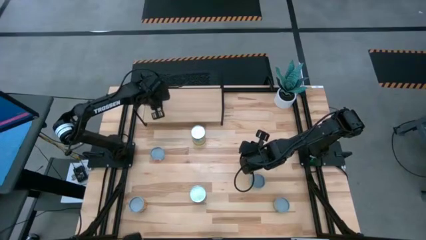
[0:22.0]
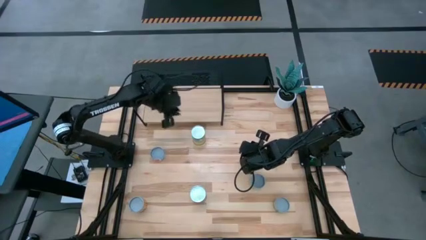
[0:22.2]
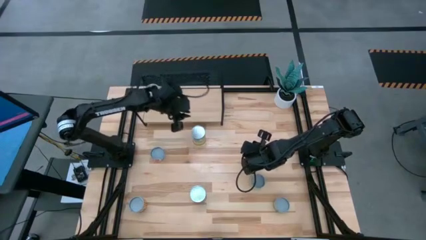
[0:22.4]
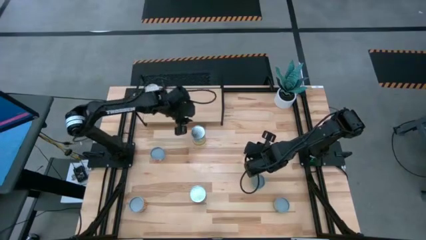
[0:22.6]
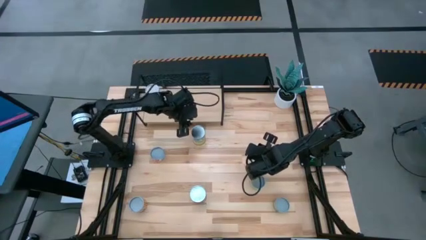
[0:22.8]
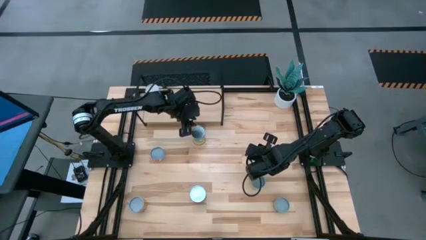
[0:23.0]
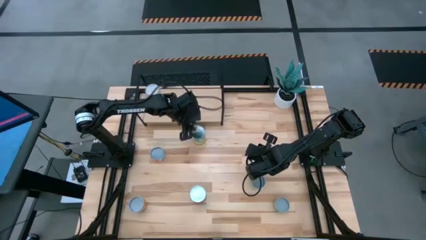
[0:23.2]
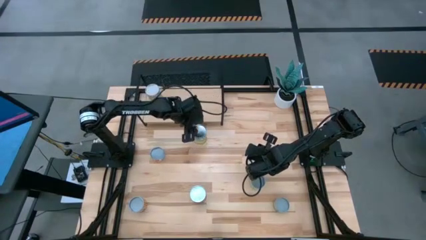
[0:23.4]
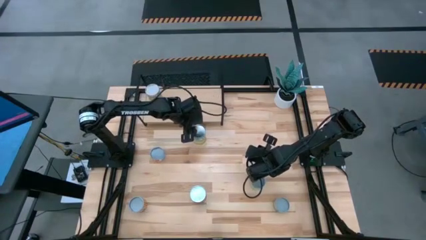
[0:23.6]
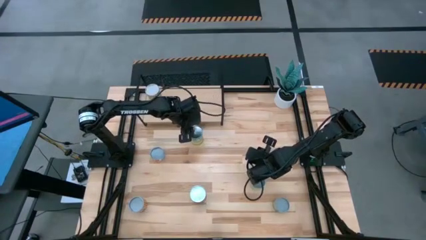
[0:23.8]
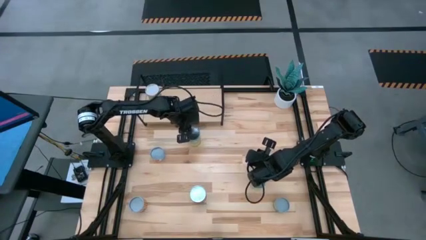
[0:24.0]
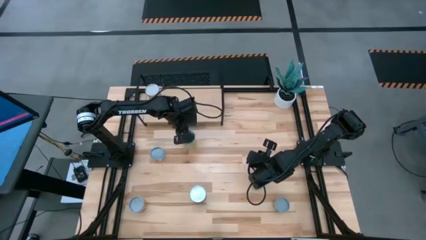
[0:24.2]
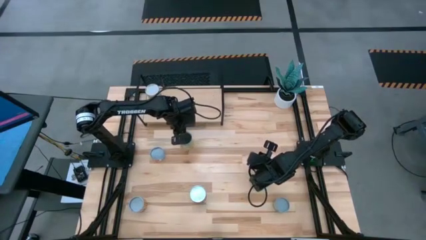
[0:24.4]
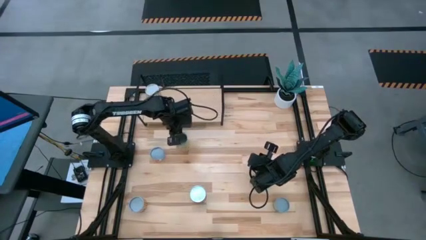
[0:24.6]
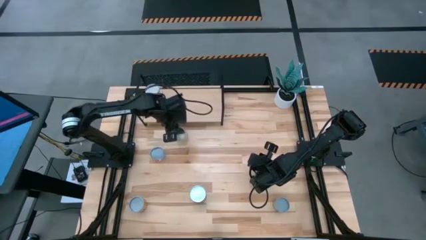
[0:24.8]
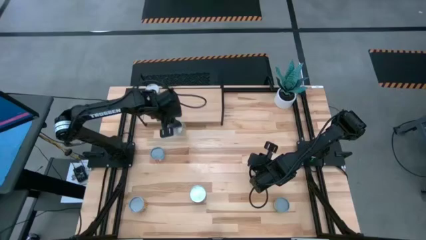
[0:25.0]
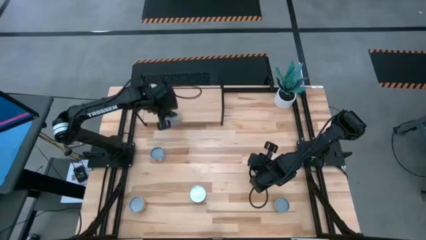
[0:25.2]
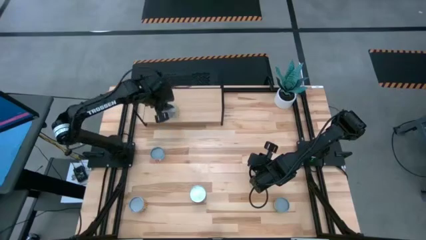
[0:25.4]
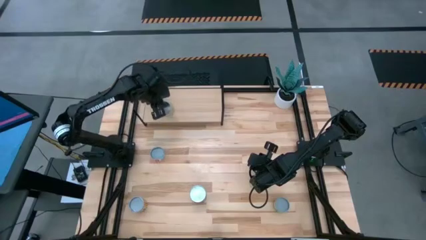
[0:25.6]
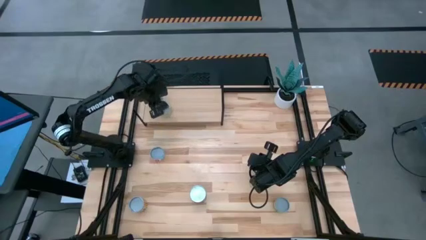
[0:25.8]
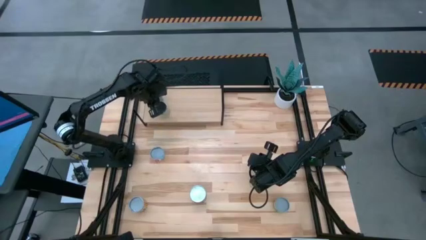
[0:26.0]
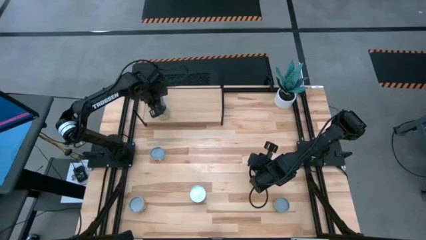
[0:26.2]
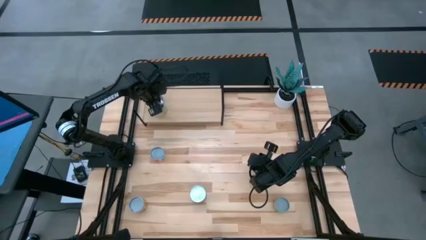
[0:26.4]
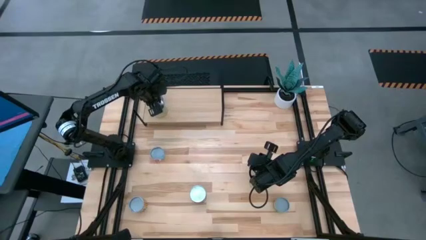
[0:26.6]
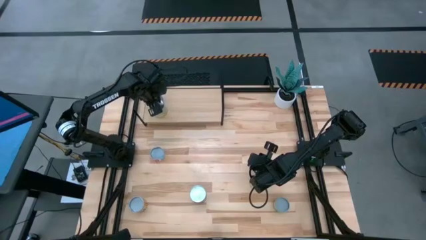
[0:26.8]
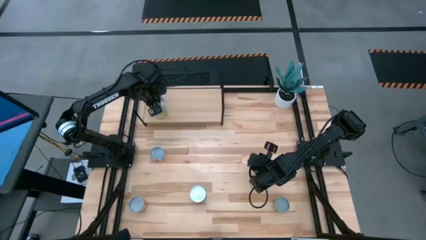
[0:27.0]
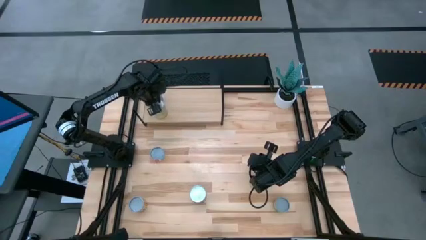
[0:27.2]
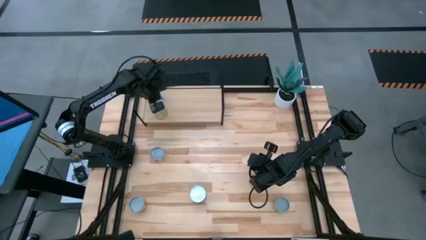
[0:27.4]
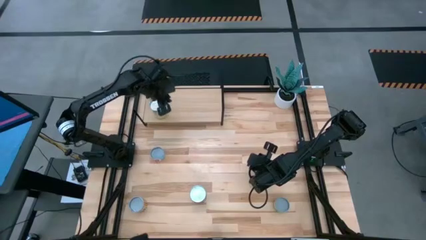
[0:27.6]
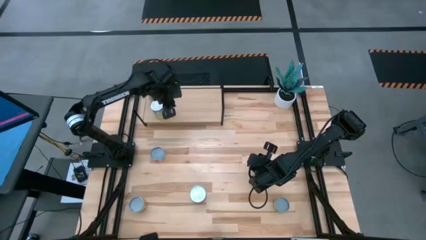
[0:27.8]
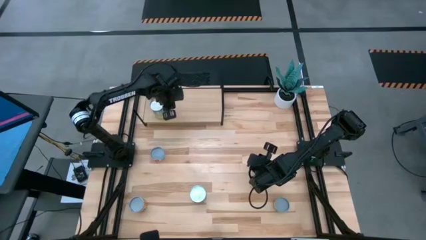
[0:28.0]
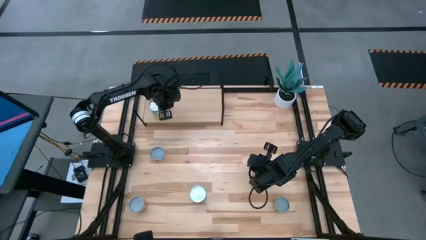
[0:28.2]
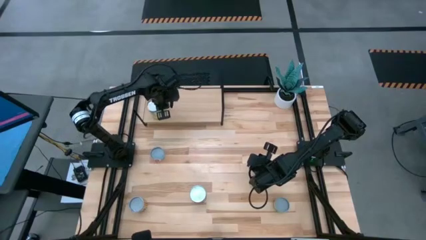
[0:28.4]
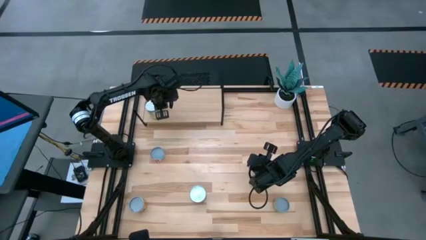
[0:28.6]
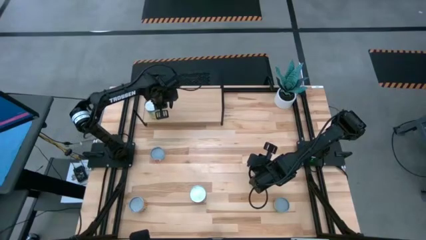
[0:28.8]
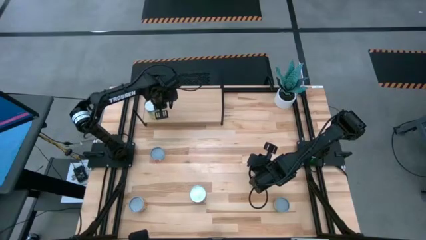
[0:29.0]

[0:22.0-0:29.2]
Task: Pick and place cans onto a shelf
Put the carrots can on the shelf

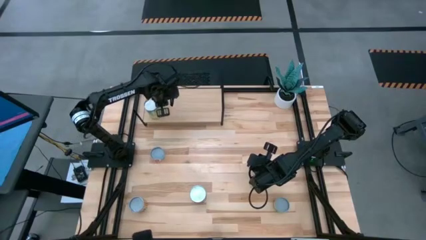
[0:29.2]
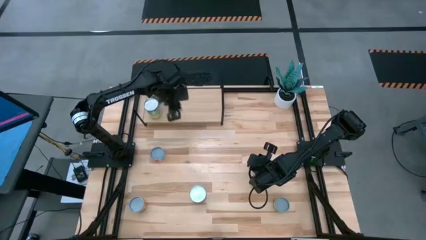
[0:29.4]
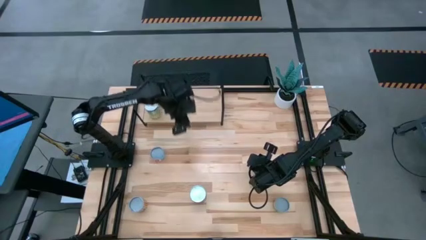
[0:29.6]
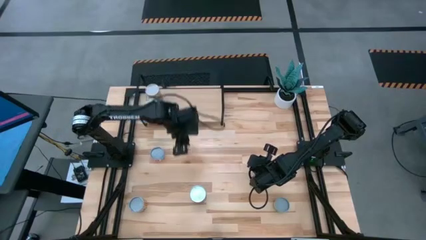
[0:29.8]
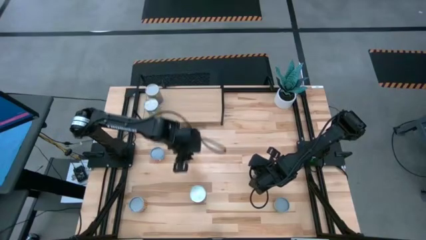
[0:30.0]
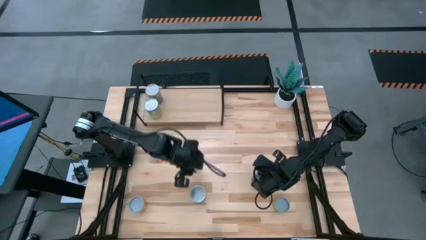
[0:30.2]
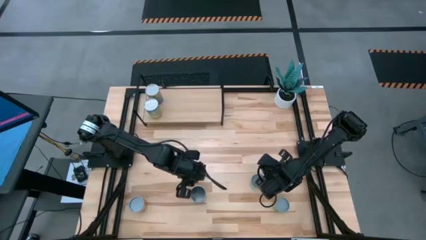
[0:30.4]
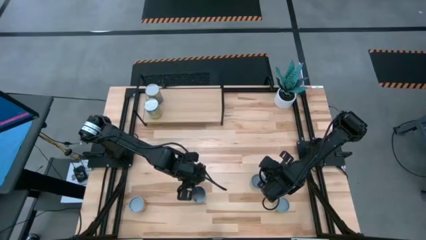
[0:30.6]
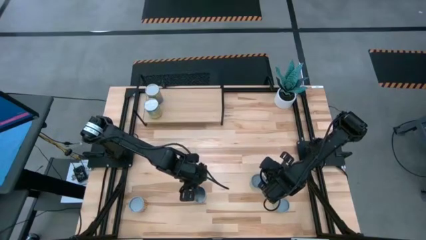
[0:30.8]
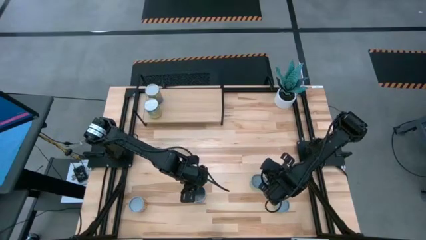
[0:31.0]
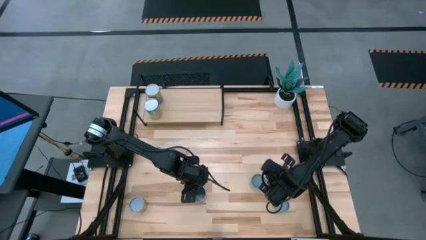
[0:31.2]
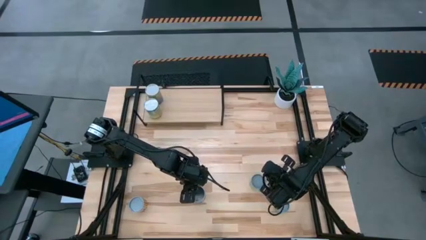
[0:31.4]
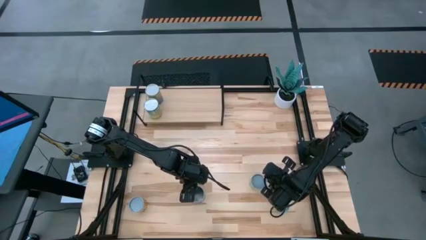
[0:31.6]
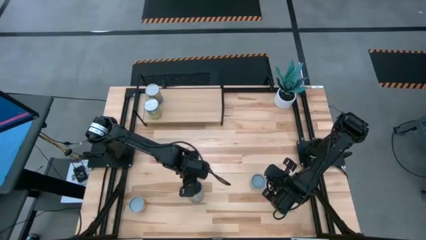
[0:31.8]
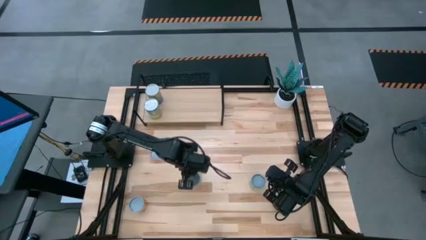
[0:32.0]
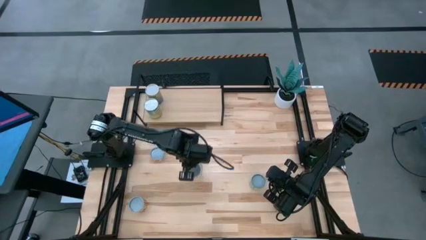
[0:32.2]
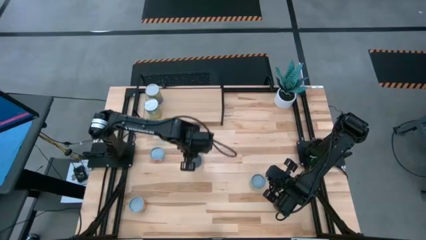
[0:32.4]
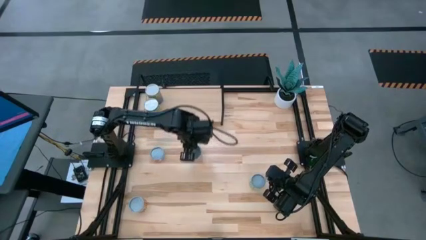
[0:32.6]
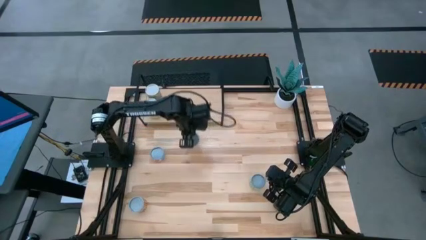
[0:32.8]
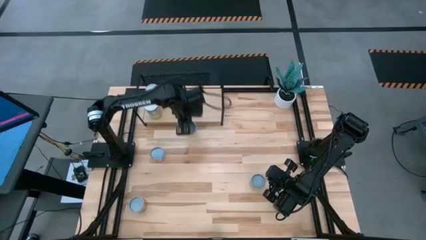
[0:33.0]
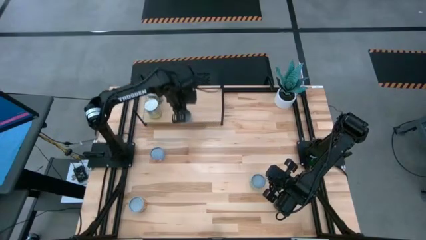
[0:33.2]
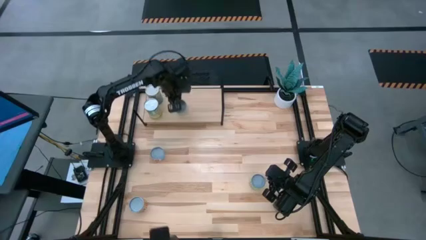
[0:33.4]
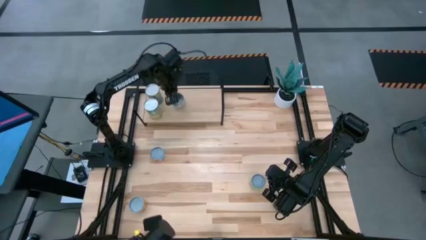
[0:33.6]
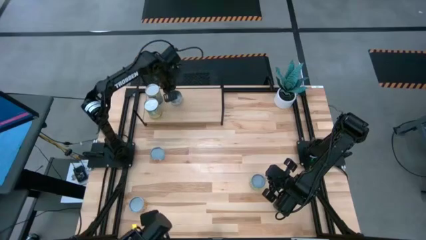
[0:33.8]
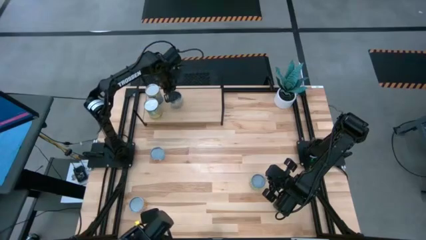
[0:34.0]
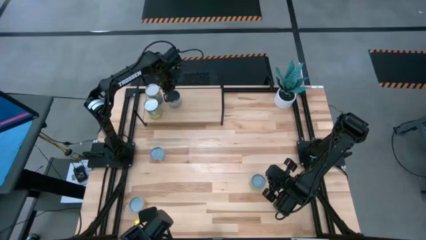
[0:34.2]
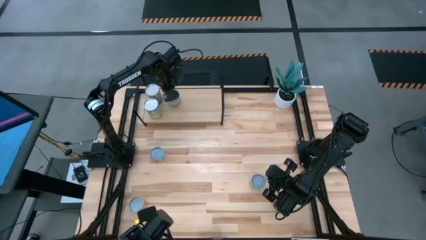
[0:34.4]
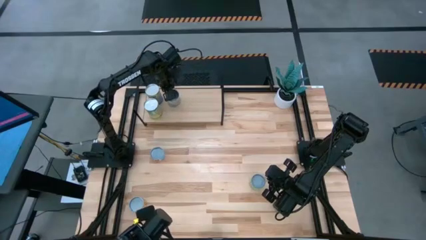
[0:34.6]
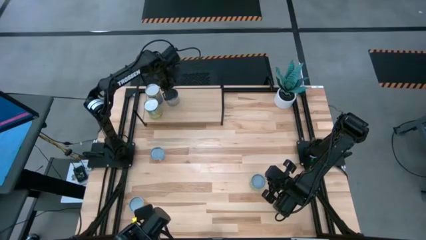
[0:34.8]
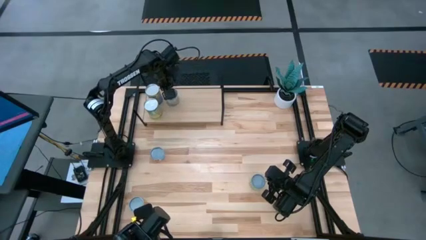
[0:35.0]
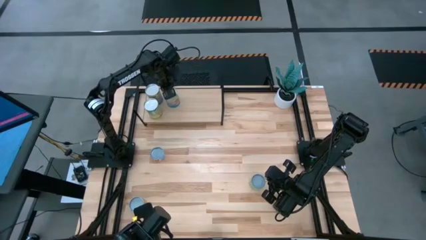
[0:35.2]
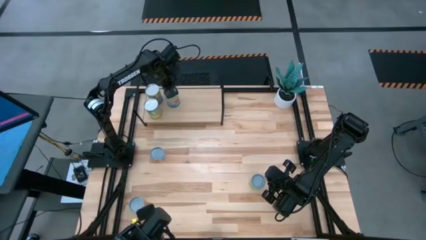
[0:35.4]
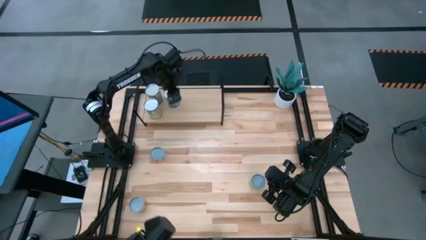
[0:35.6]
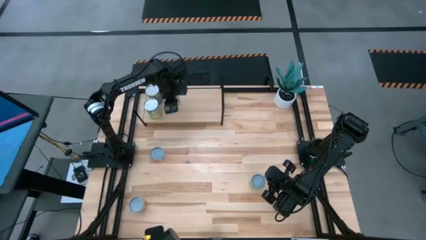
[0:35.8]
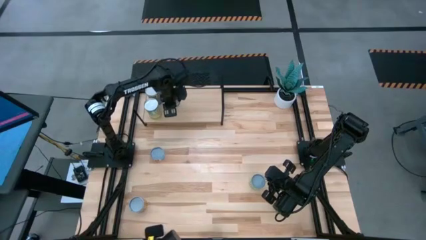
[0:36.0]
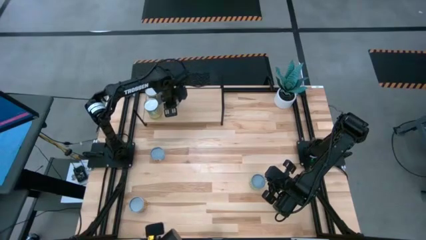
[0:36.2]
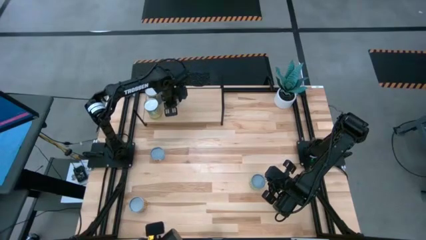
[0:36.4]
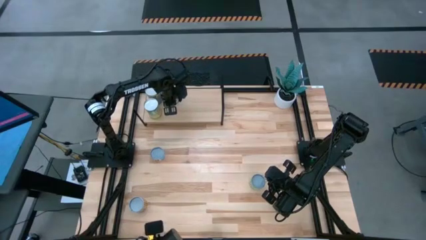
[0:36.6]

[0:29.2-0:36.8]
Put the tomatoes can on the shelf
